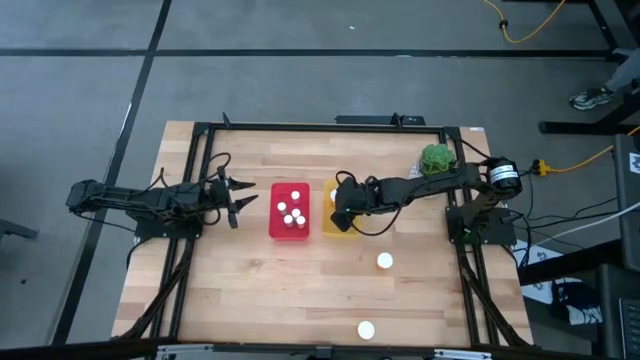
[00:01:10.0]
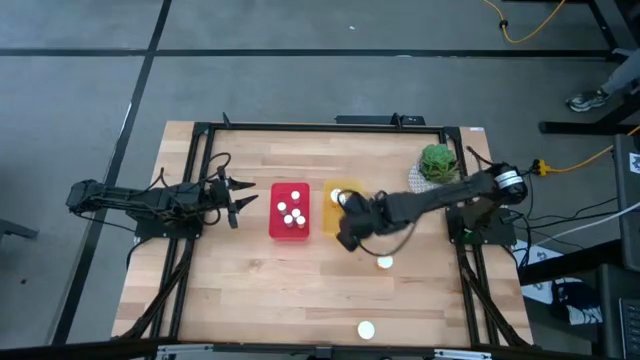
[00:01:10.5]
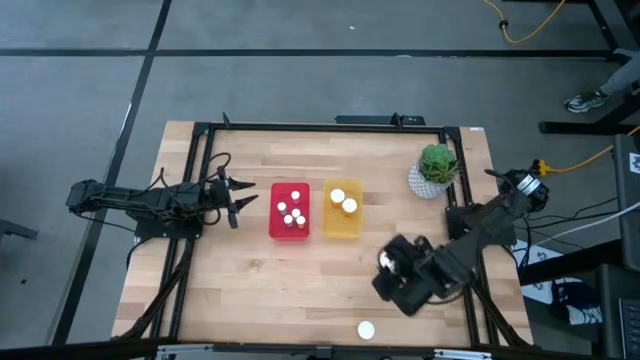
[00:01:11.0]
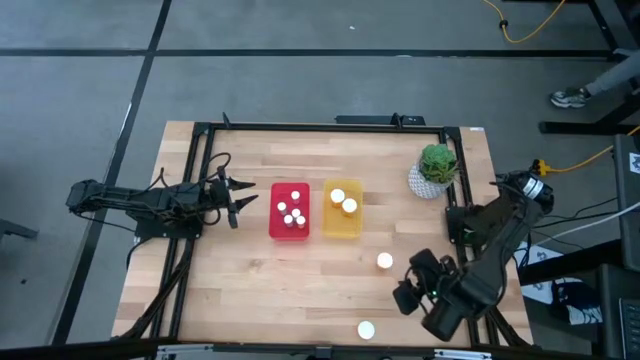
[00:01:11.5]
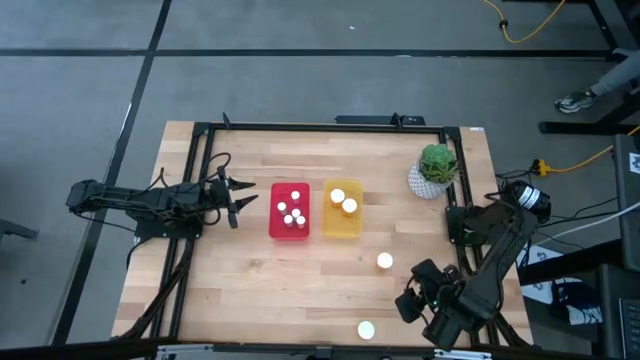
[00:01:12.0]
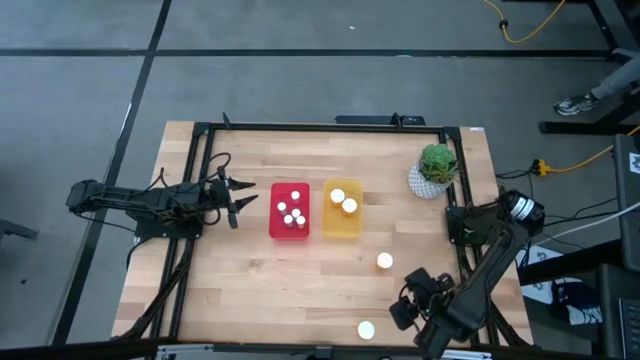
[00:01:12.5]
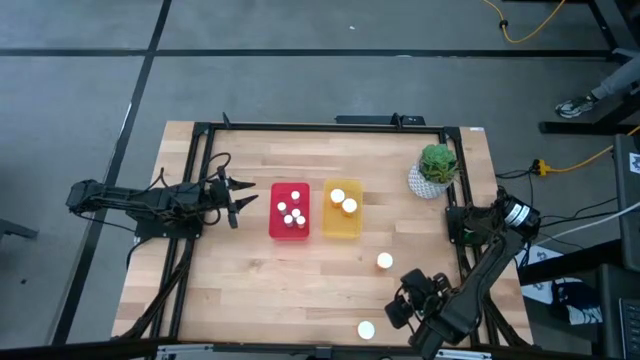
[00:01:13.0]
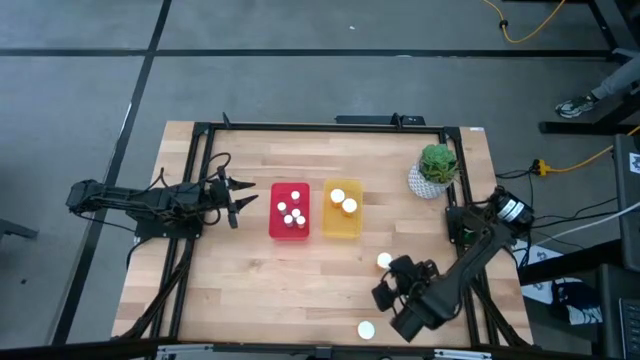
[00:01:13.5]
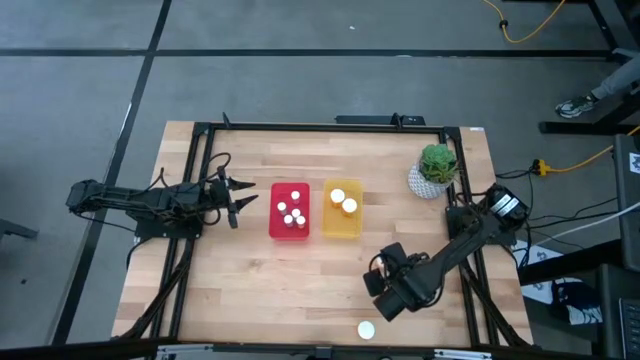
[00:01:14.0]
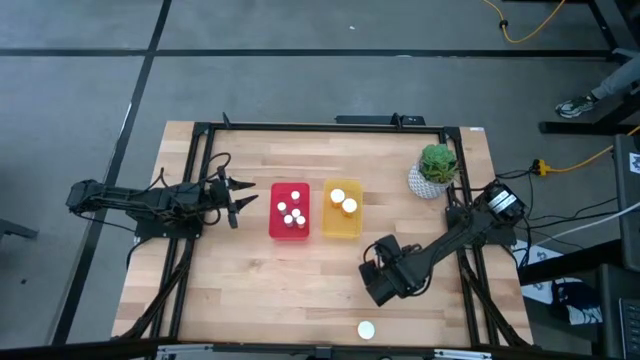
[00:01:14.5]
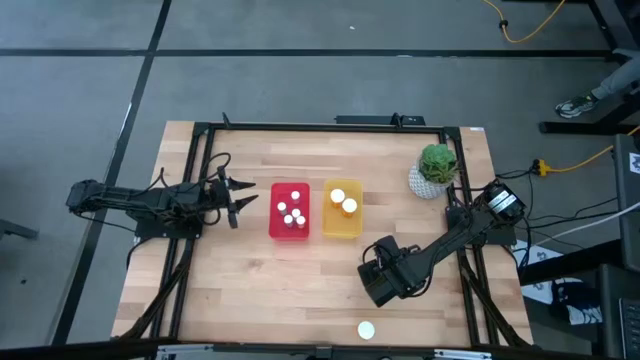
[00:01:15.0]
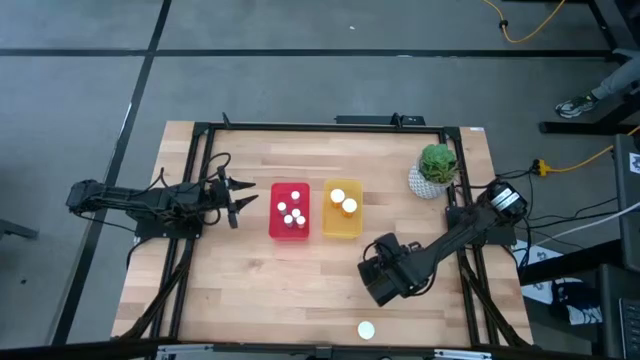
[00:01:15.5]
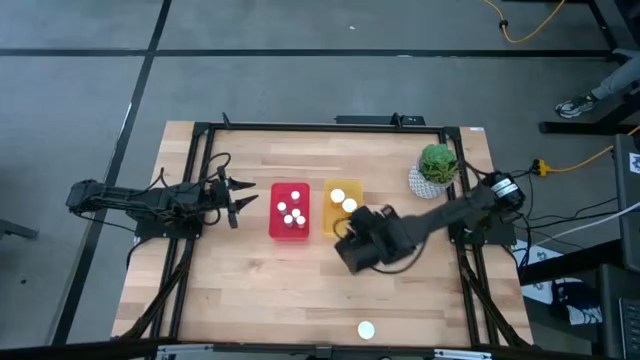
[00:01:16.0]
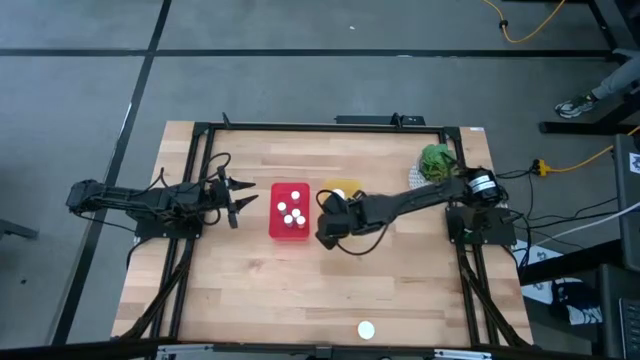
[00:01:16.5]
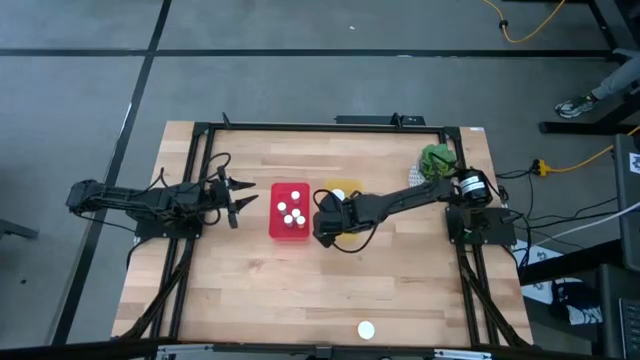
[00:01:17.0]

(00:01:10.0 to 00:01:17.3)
Task: Pick and place medicine bottles into bin by pill shape (circle, oval)
Put the large orange pill bottle into the yellow bin

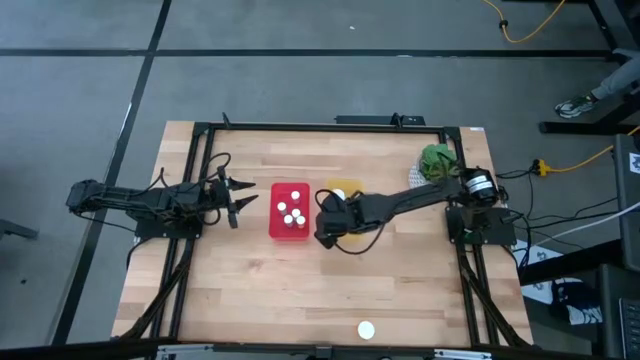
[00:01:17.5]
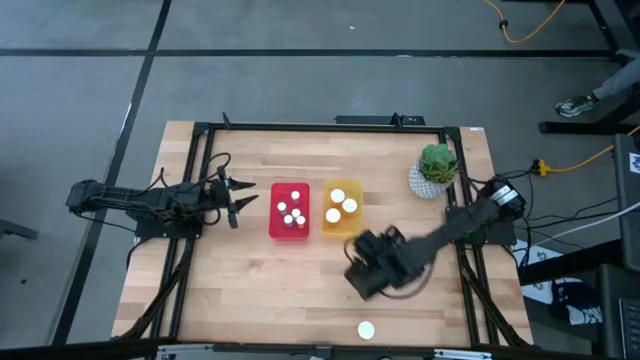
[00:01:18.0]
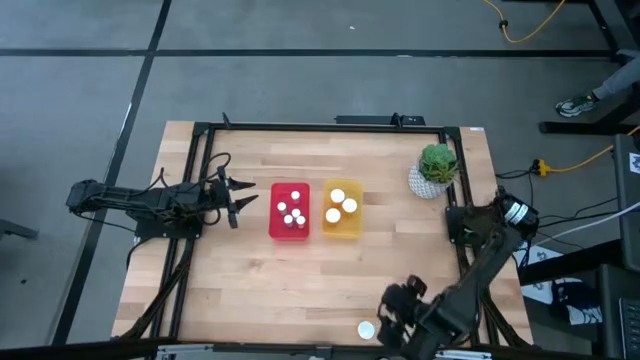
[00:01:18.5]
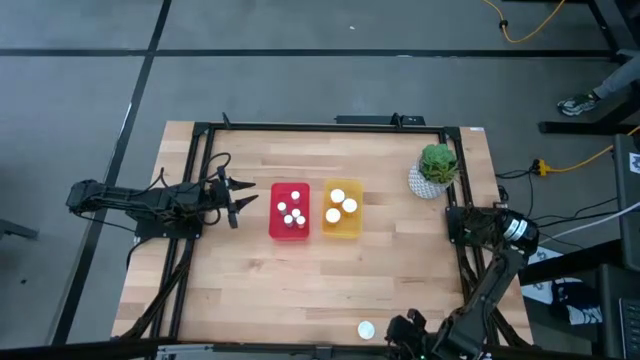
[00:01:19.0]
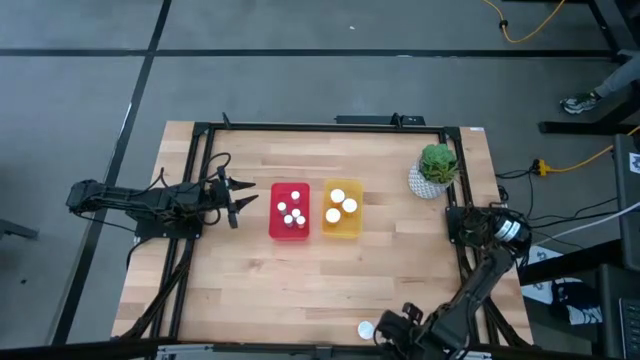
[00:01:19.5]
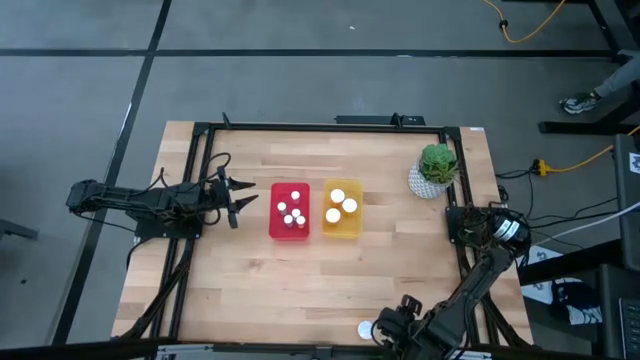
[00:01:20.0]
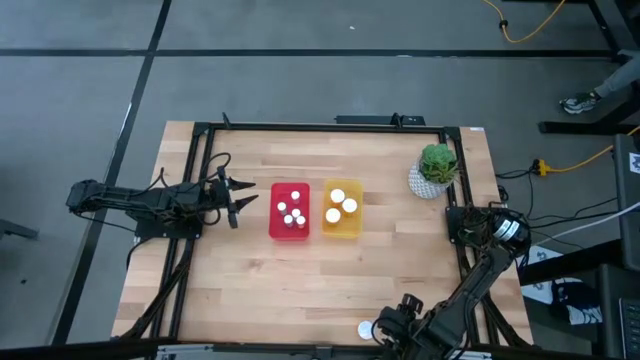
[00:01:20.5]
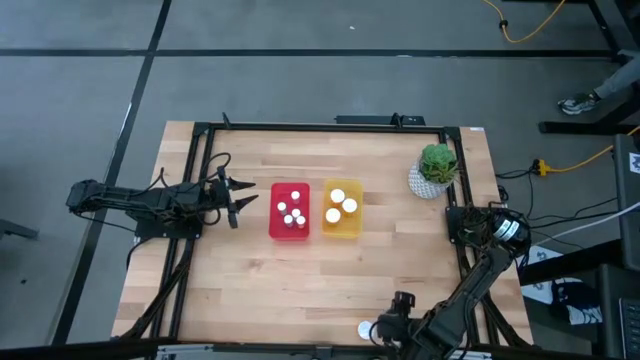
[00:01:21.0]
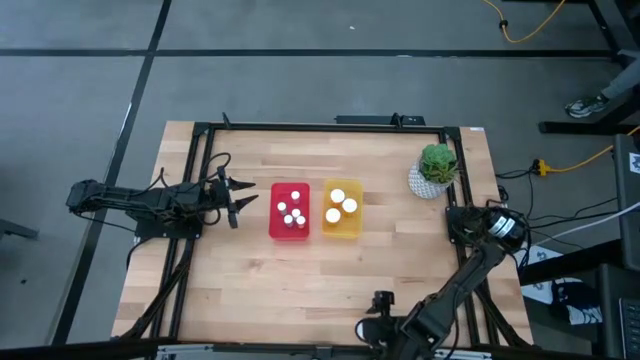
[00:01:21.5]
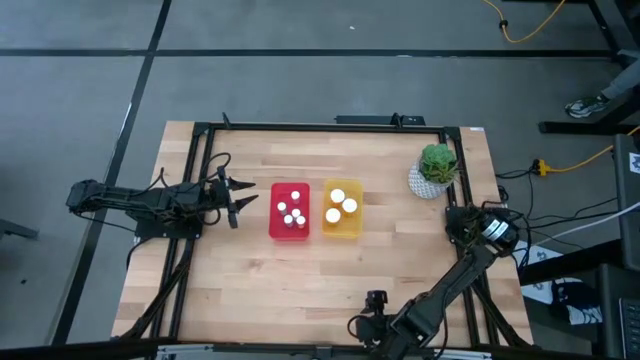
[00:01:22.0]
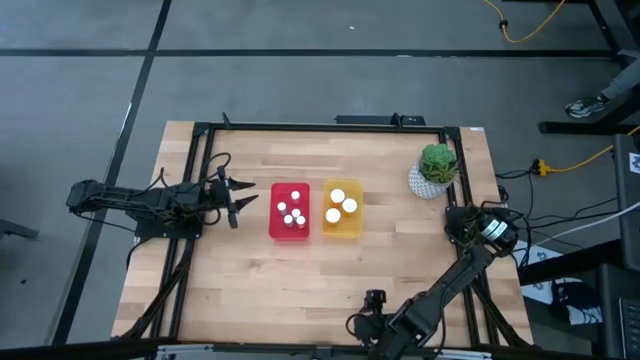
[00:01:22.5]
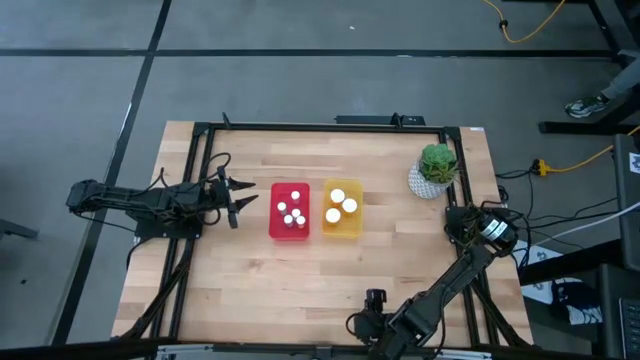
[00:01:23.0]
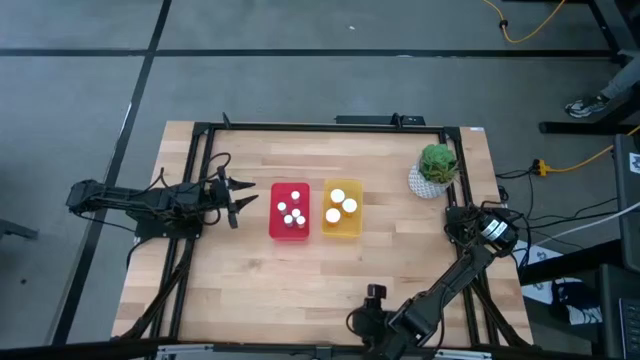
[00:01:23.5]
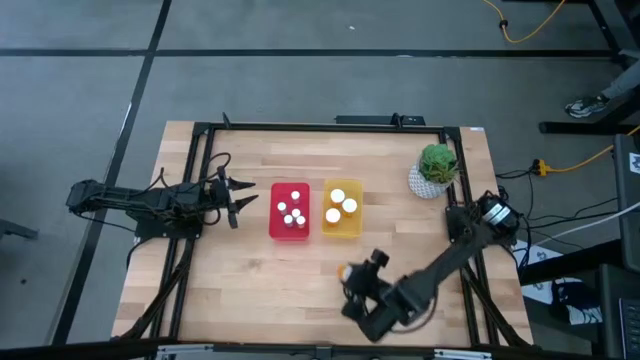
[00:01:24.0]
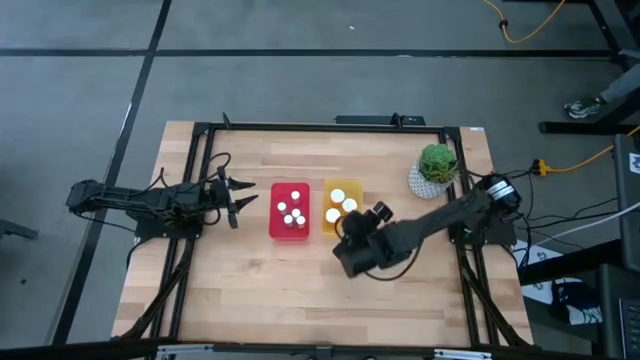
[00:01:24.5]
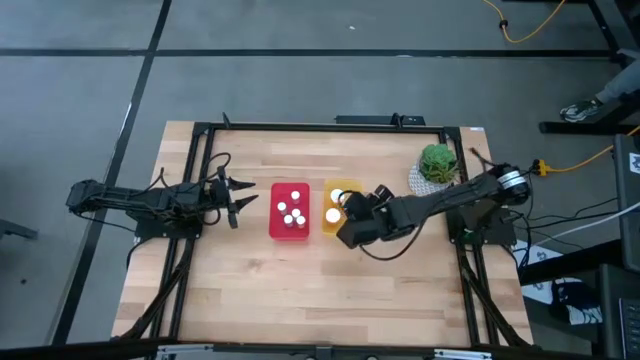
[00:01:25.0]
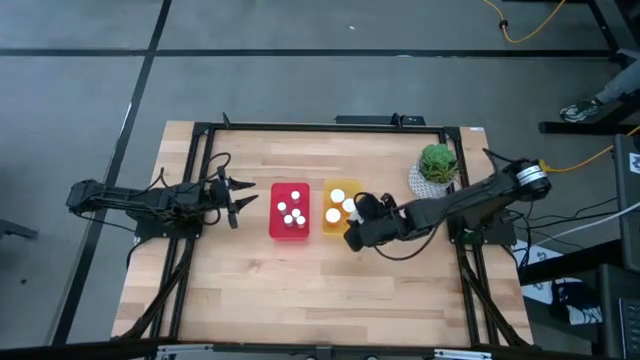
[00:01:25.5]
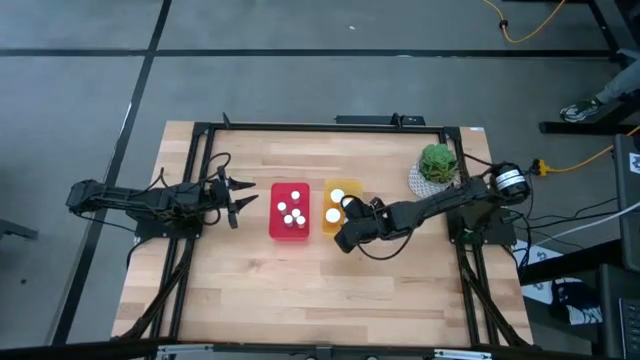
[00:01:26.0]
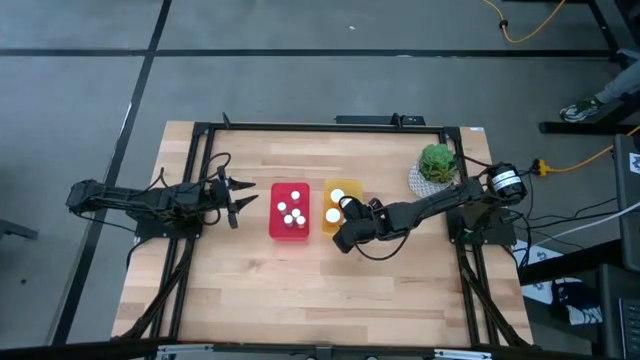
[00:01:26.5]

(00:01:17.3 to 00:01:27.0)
Put the large orange pill bottle into the yellow bin

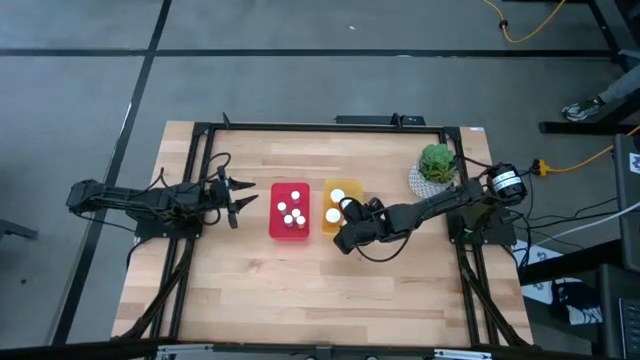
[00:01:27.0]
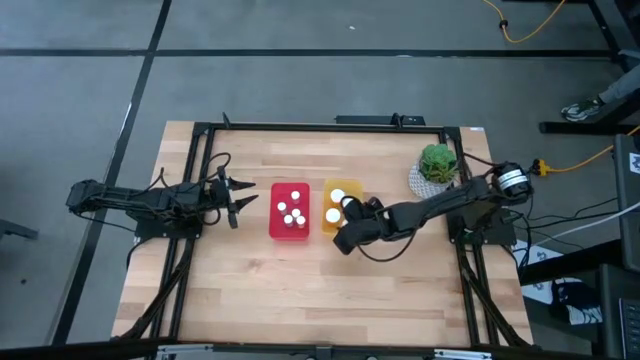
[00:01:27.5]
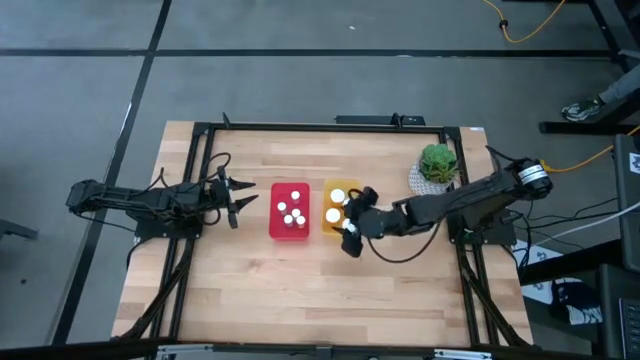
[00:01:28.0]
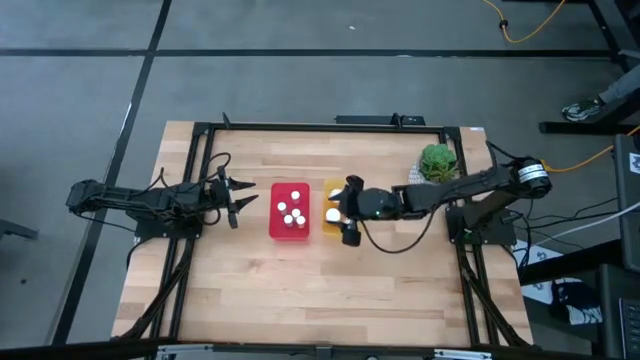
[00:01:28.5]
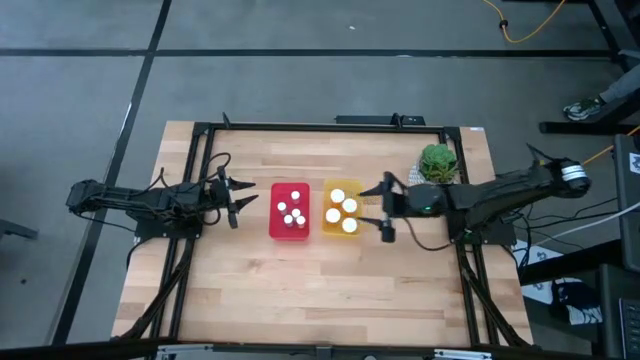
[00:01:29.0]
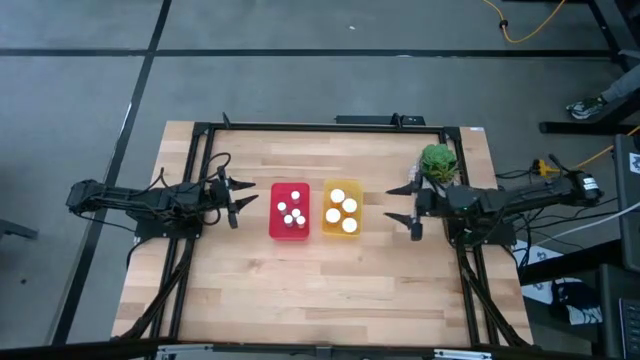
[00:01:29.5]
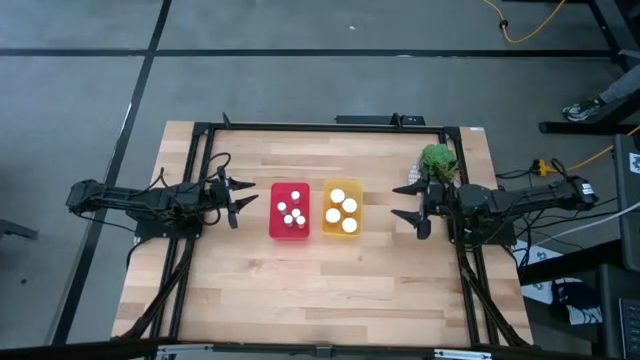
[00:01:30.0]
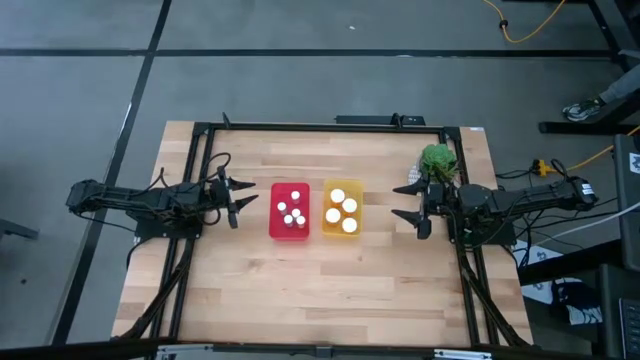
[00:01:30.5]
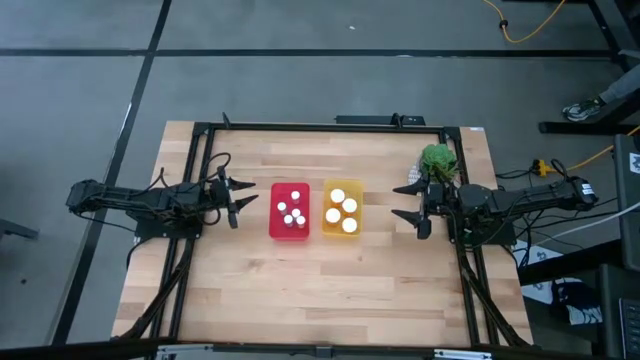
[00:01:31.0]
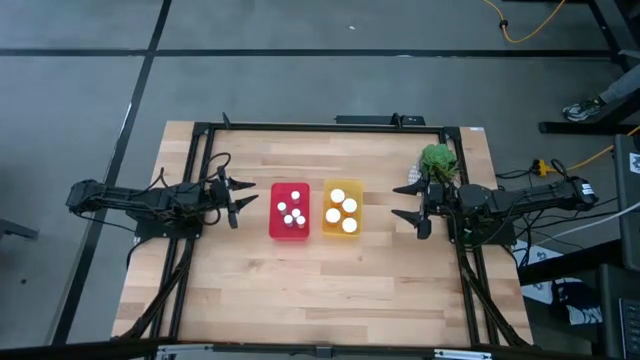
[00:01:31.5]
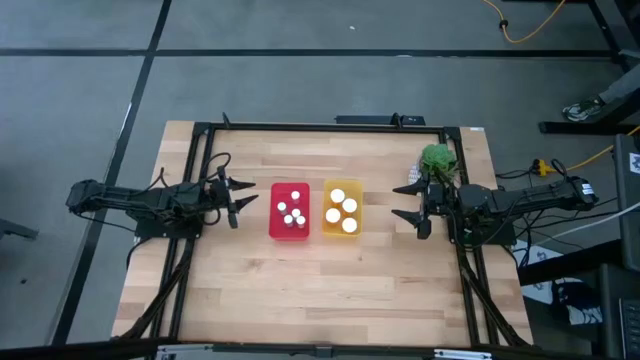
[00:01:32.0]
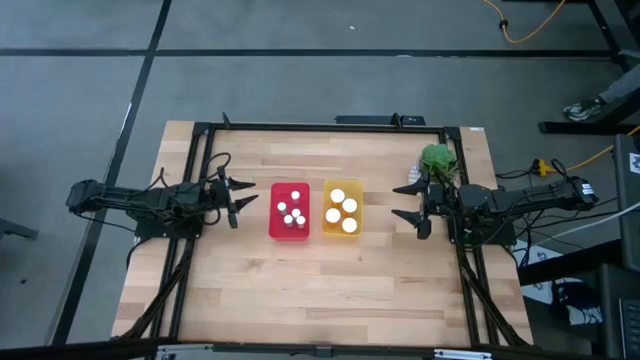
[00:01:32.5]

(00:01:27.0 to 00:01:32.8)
Return to Home Position
